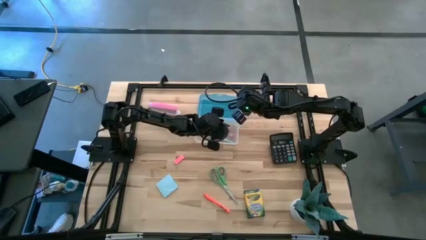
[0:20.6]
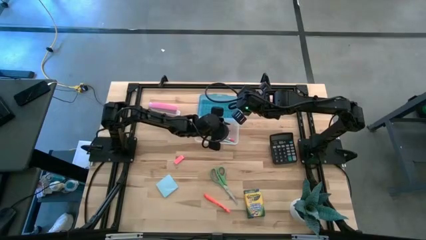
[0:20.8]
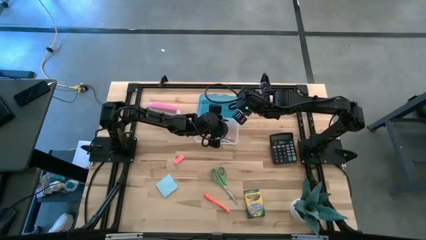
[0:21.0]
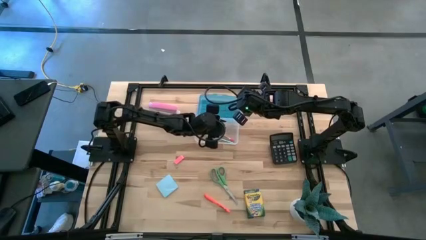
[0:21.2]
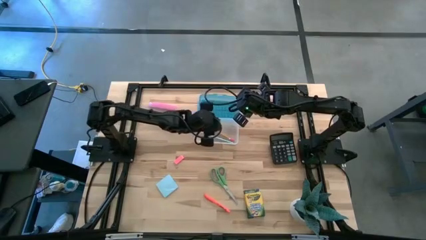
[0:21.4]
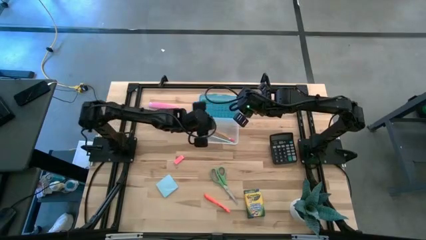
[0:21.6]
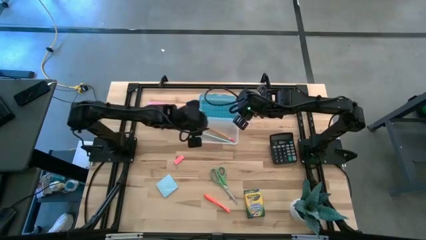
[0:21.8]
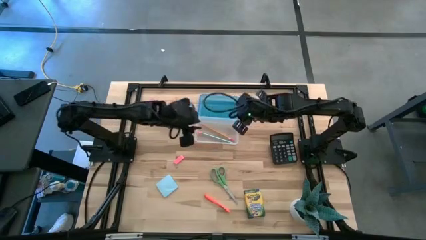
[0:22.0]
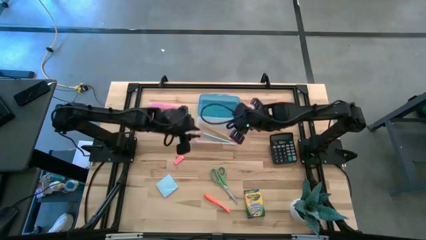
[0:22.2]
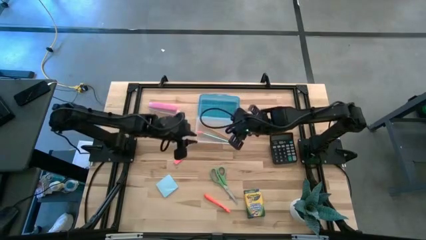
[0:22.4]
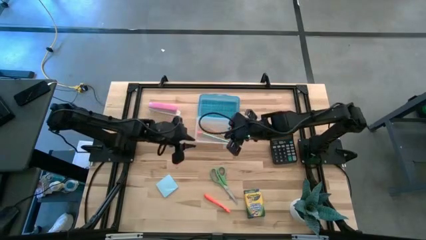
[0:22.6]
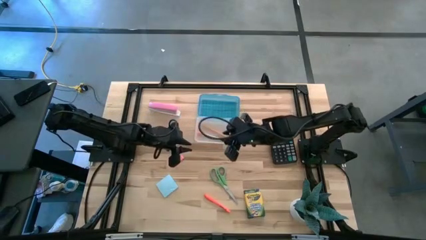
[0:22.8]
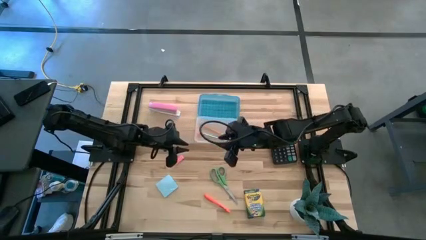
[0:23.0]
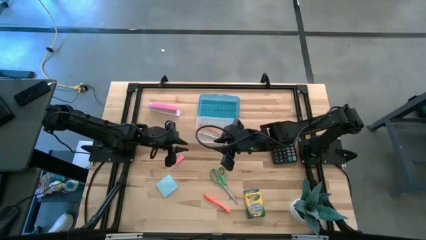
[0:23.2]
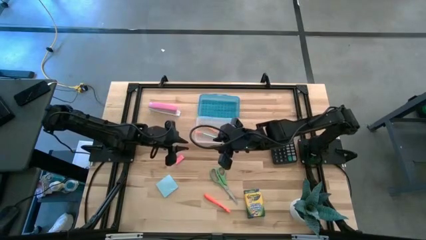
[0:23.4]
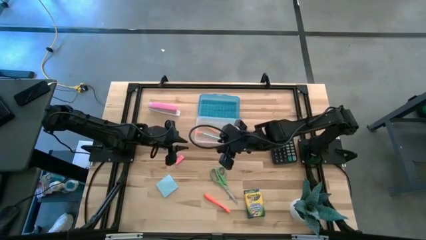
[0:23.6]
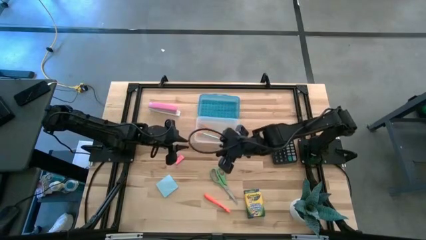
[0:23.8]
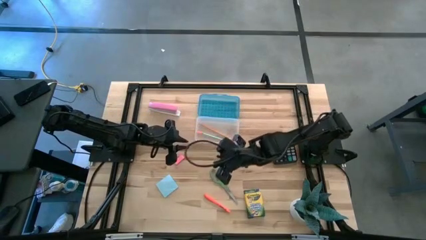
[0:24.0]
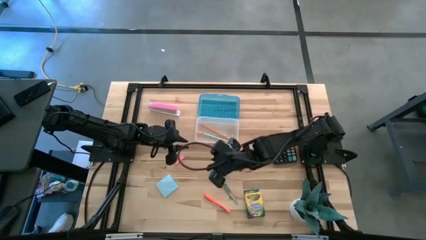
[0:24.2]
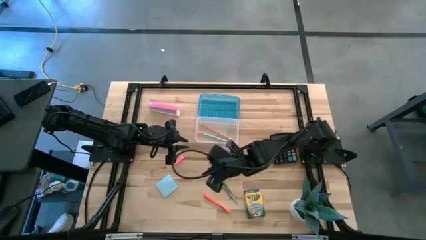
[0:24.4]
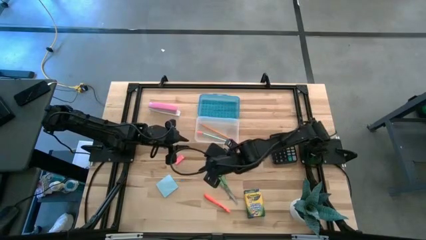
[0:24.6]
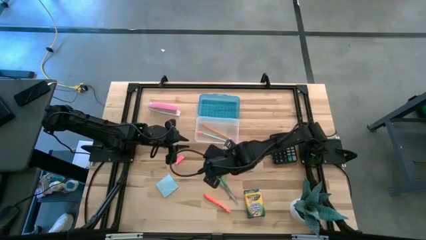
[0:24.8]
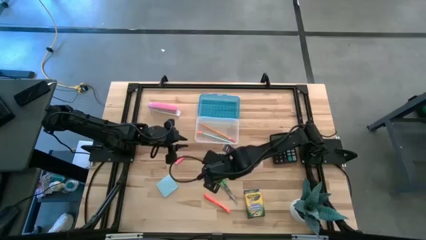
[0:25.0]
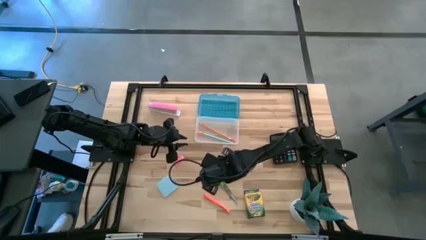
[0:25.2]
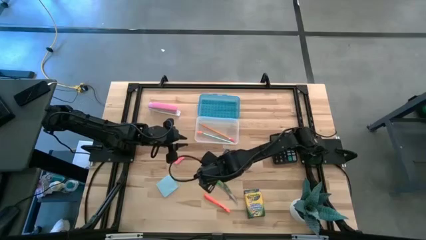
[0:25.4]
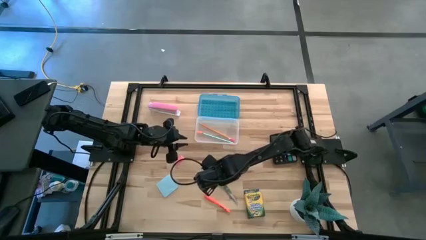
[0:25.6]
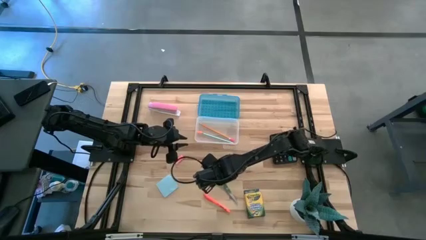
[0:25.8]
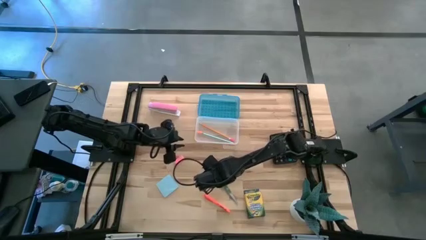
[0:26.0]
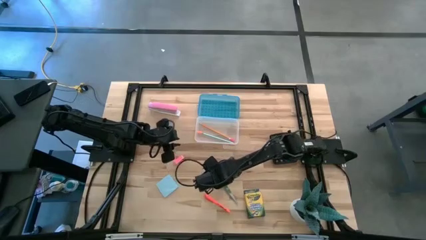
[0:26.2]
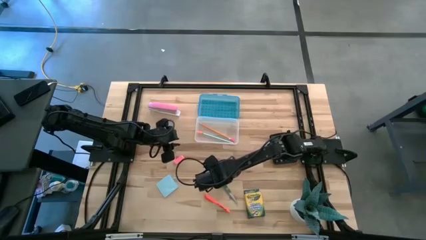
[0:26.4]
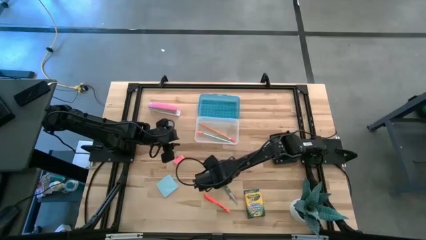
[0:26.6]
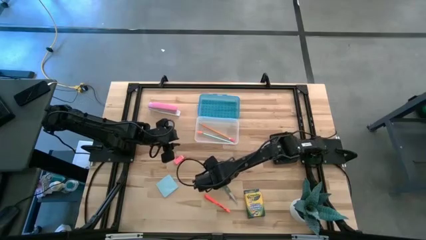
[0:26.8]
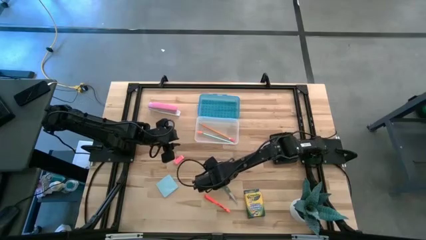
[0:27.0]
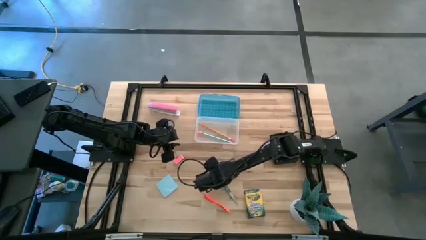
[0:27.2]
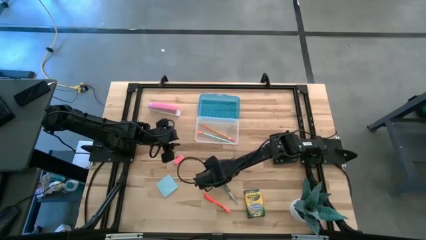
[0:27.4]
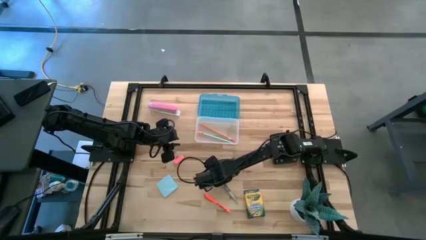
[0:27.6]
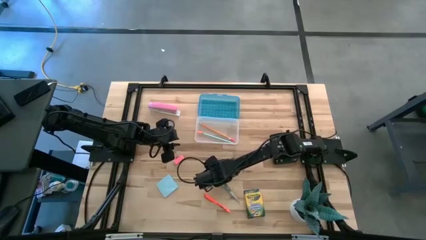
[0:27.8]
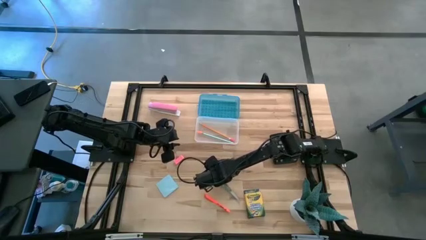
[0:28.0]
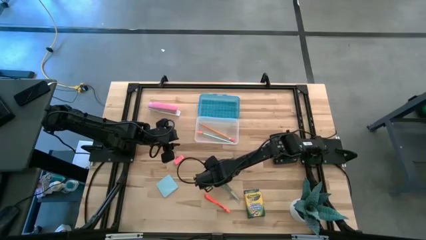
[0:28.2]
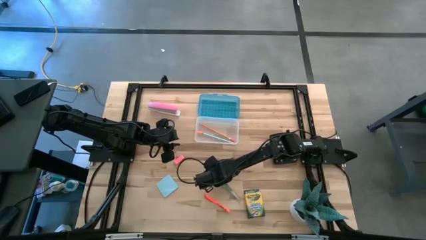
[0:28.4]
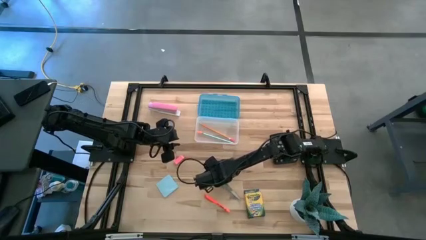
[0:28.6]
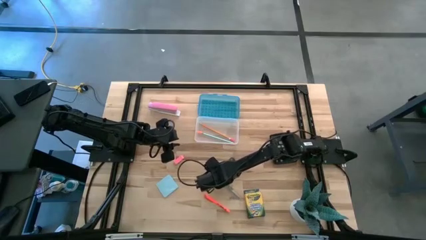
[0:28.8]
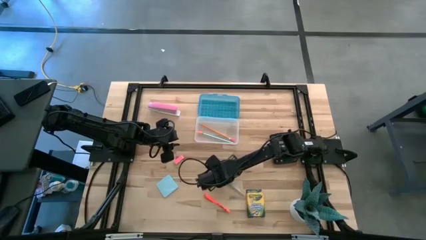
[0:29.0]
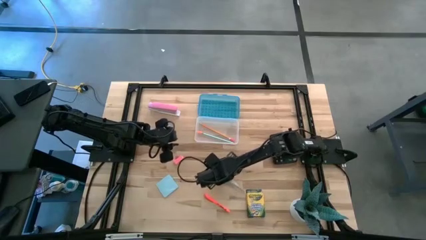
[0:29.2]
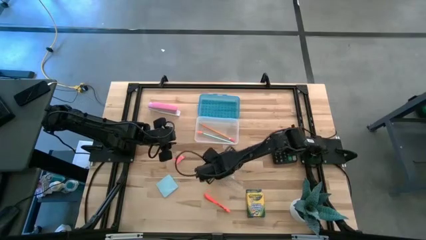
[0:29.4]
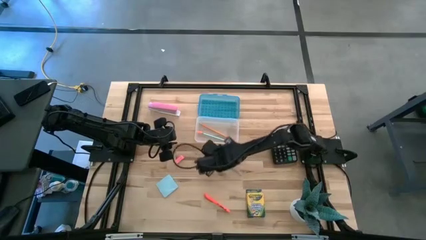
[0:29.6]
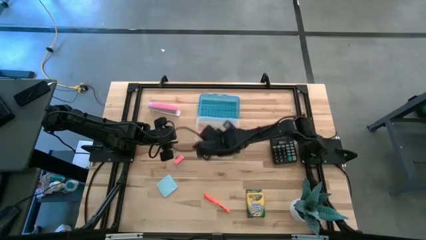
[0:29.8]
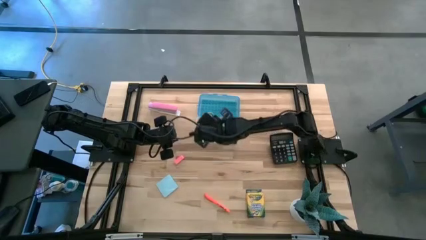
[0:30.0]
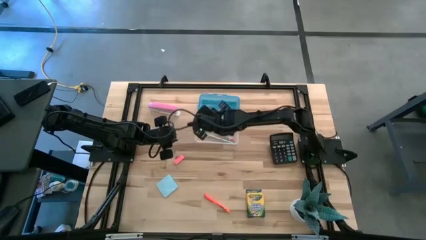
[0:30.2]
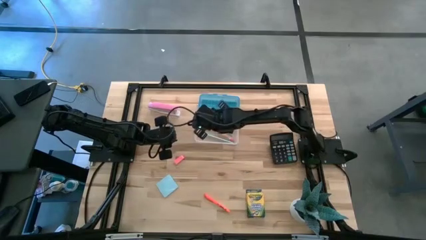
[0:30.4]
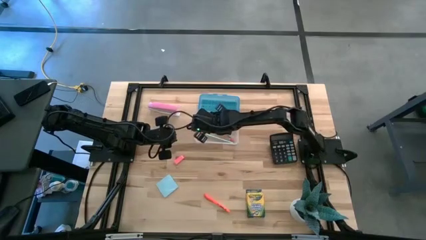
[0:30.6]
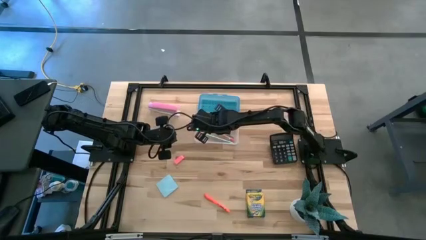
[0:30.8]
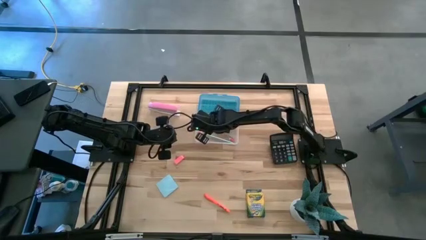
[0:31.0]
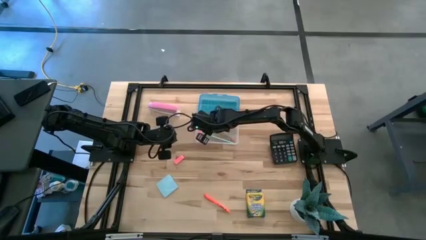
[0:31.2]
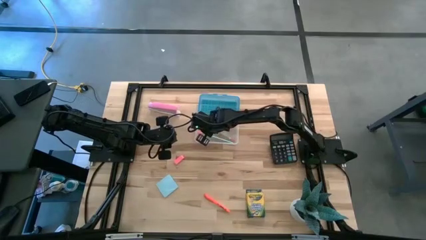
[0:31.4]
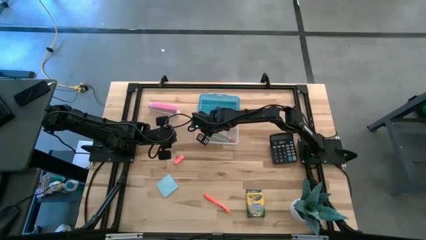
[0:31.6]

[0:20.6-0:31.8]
Task: Pack school essentials
Put the green scissor into the blue supply box

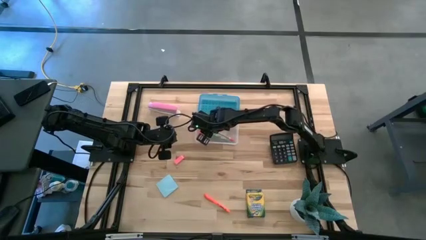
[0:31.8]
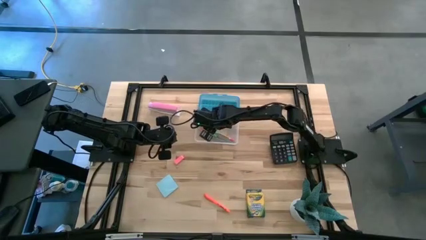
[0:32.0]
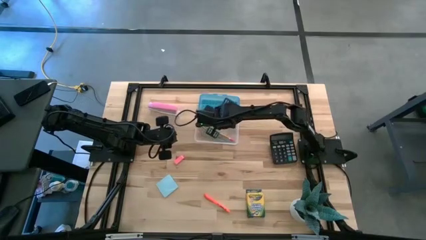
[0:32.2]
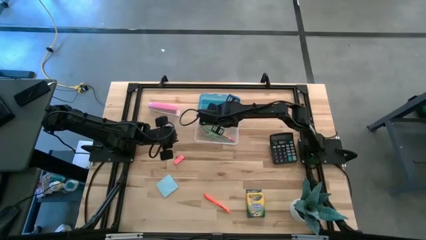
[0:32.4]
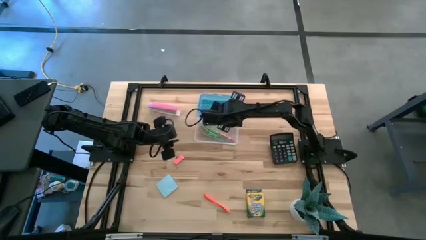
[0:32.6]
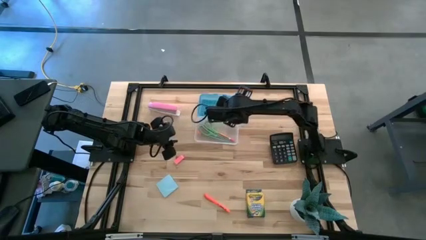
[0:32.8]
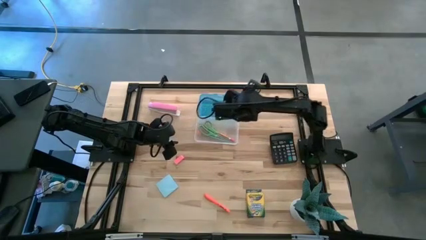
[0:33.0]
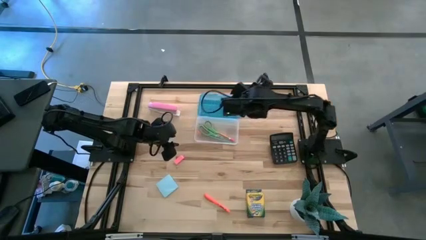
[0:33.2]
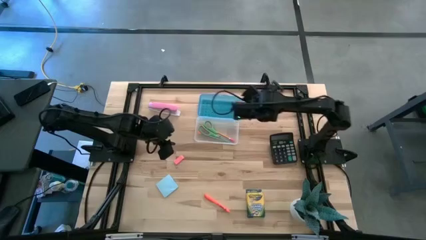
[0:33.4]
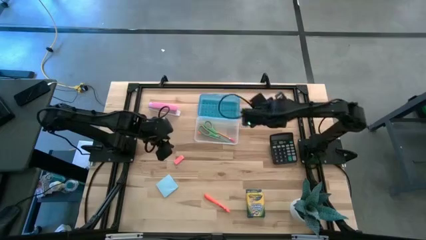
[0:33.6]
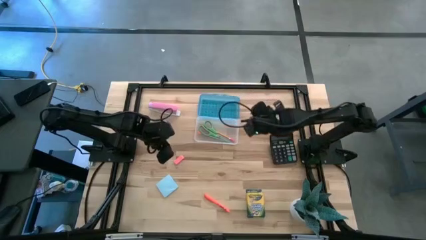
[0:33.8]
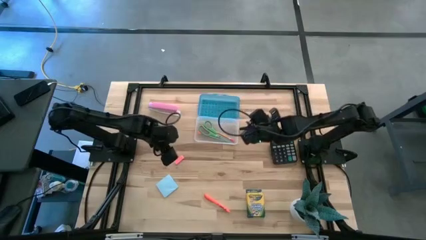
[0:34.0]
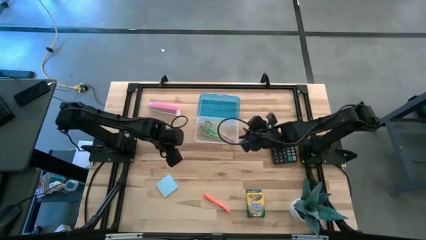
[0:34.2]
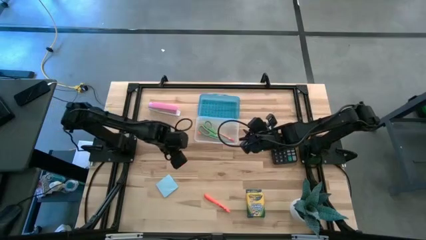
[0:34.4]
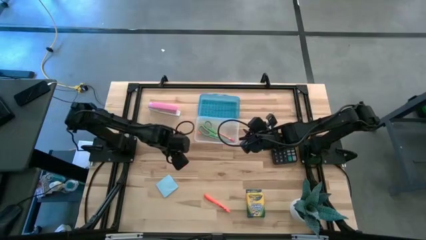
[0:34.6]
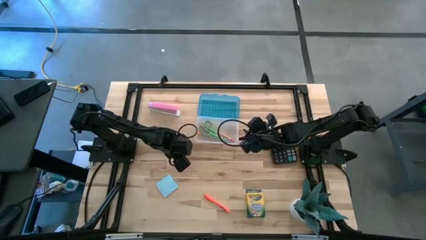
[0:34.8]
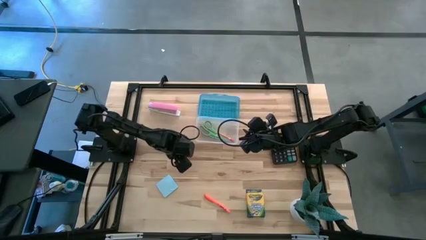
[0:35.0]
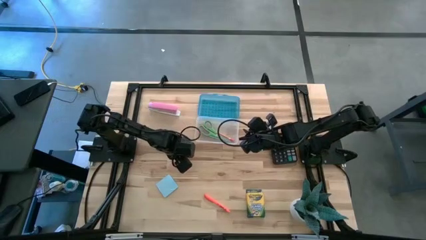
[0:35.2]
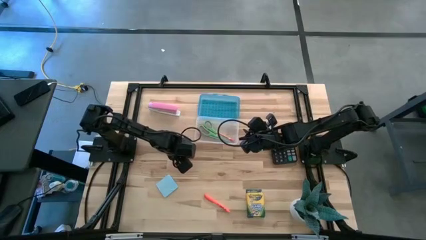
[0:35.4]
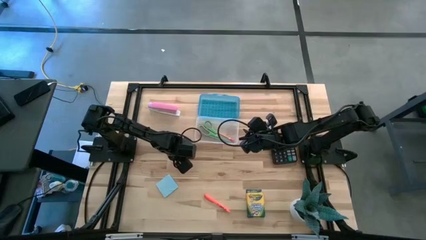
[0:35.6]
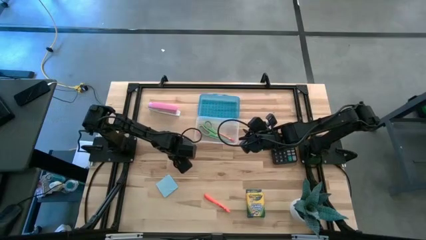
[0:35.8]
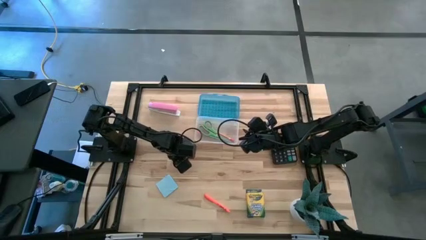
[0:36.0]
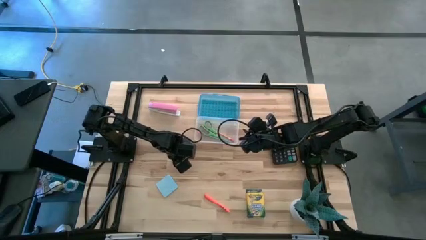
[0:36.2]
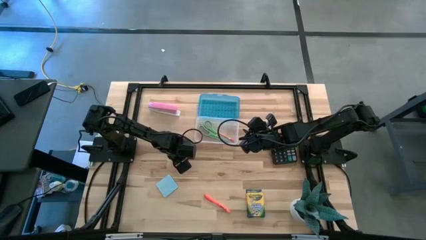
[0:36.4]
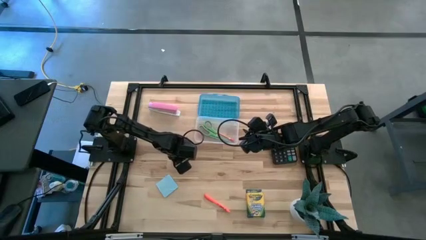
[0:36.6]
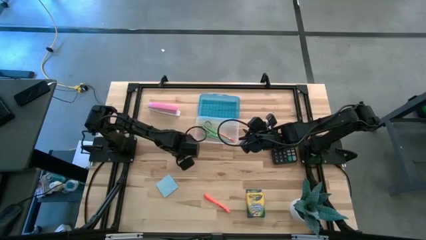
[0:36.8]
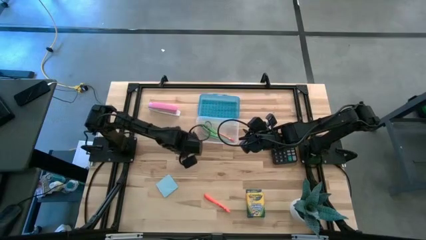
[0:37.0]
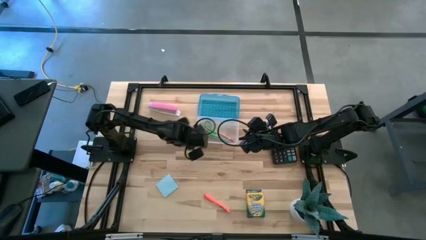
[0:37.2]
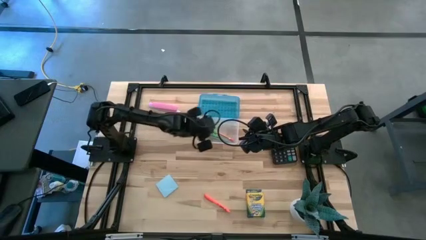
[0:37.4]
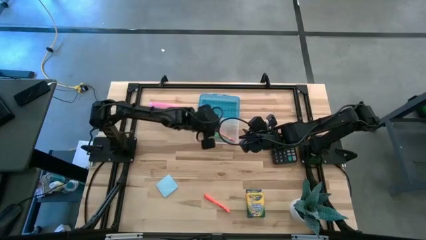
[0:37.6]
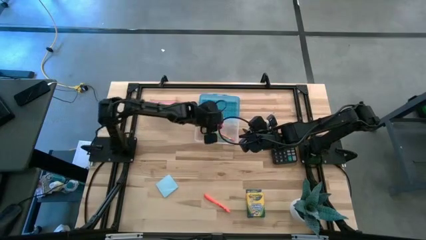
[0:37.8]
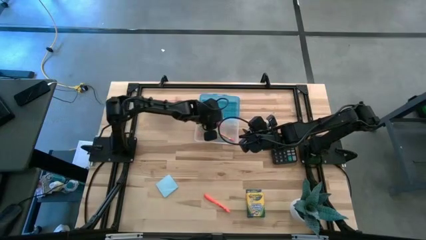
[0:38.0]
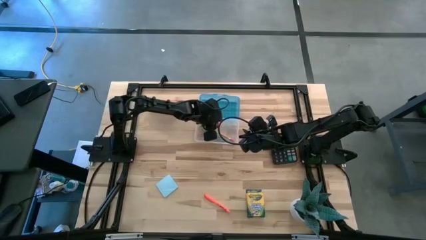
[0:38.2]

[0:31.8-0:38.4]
Put the pink eraser into the blue supply box
